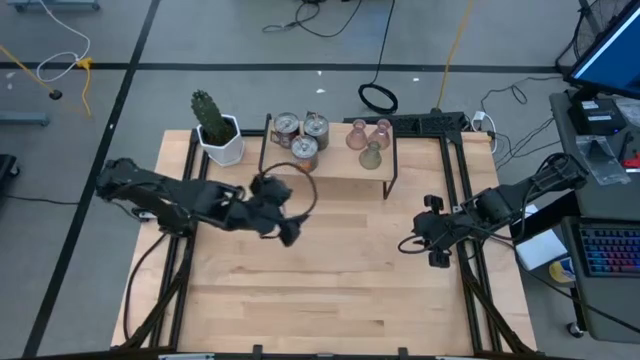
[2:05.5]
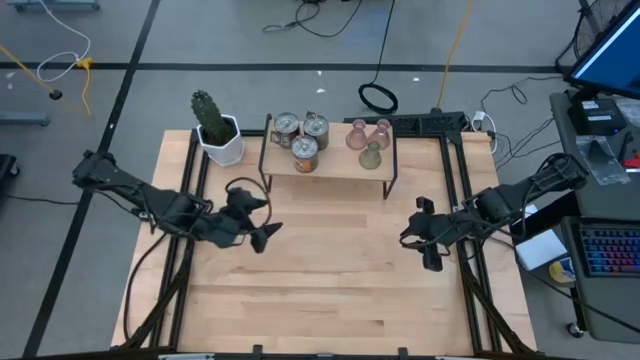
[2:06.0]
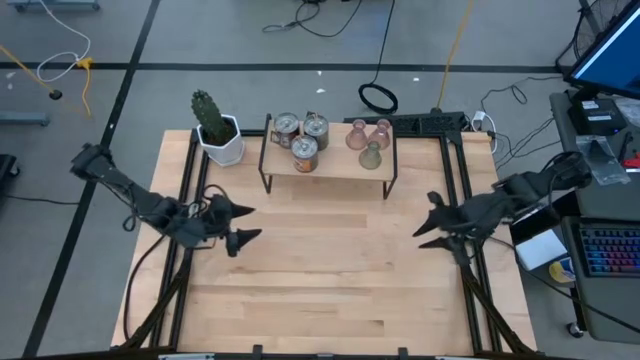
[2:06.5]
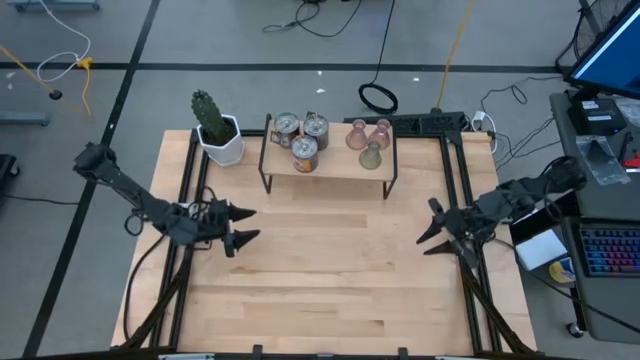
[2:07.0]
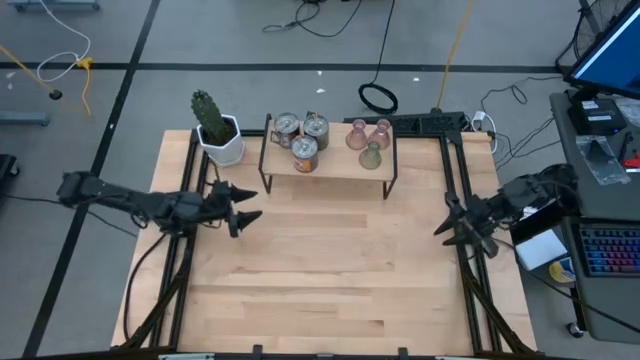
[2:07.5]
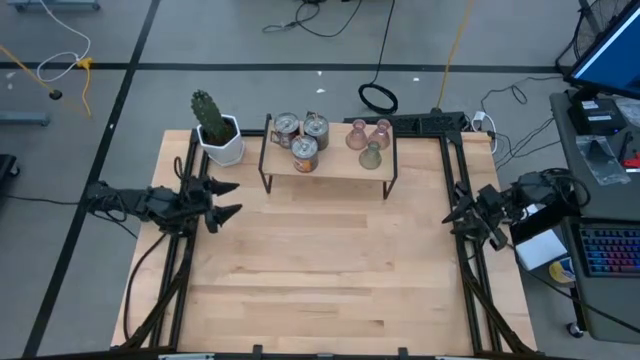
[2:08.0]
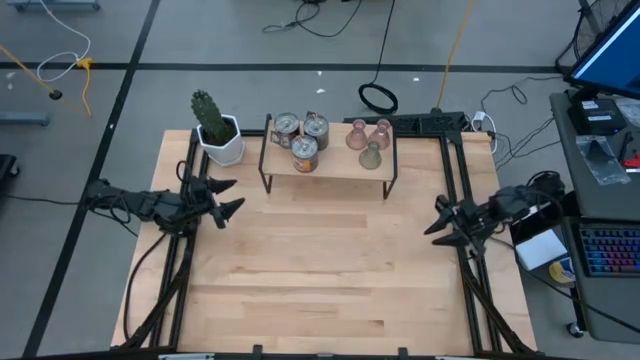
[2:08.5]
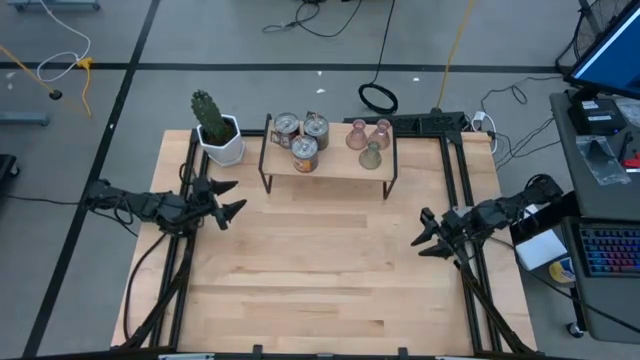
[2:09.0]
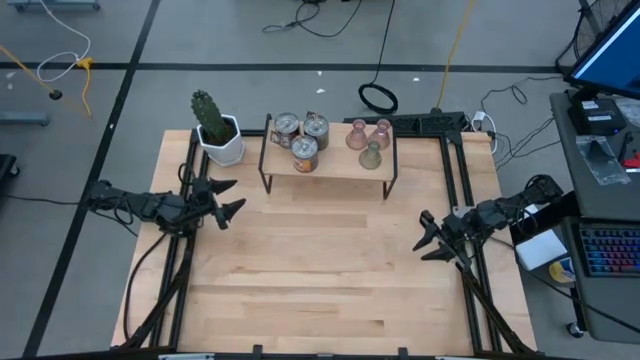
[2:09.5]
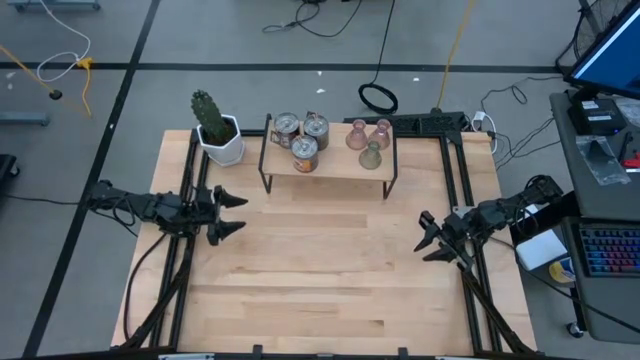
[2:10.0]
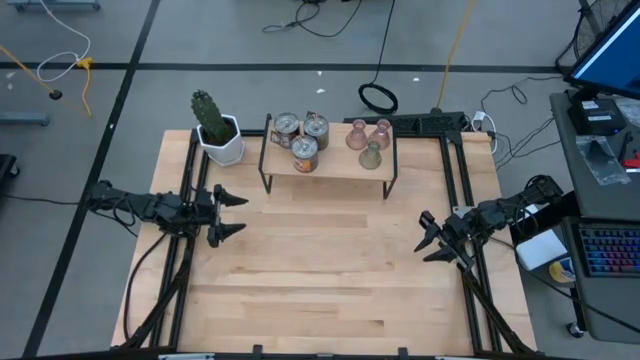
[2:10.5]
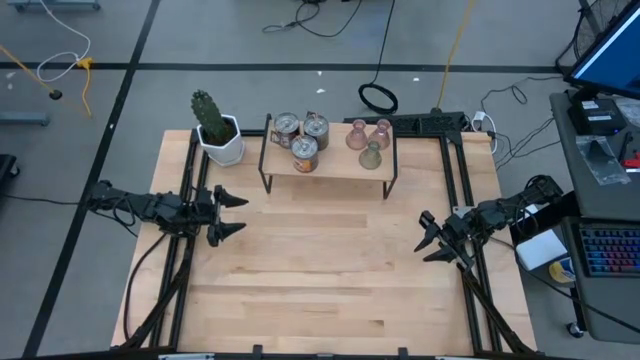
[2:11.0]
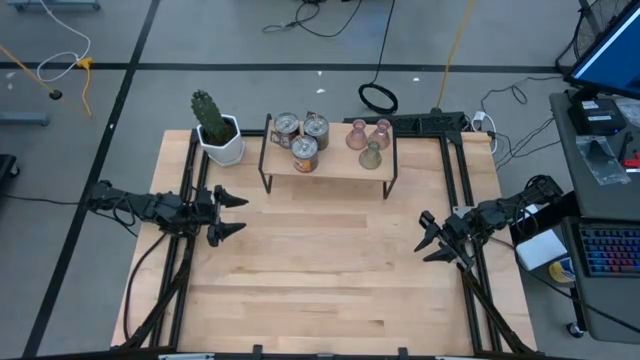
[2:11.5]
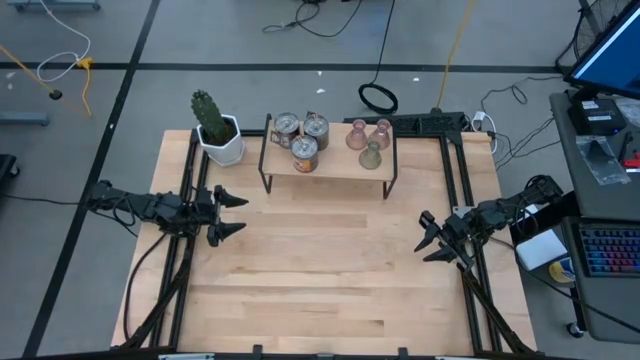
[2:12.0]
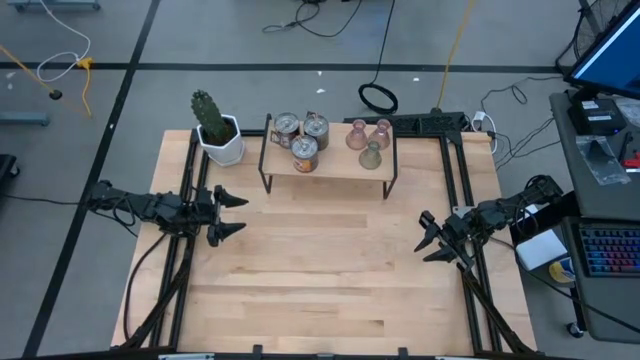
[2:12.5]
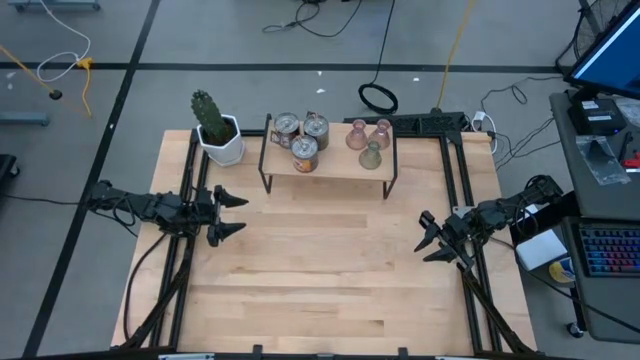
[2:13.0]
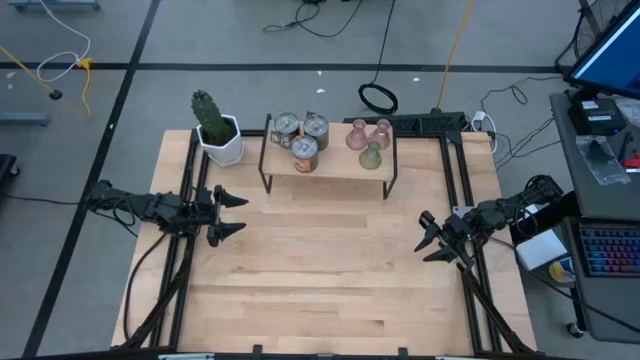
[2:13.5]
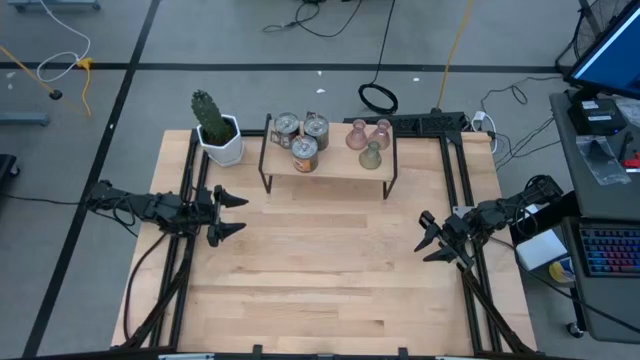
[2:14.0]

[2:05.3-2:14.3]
Task: Pick & Place candle stick holders
Return to Home Position

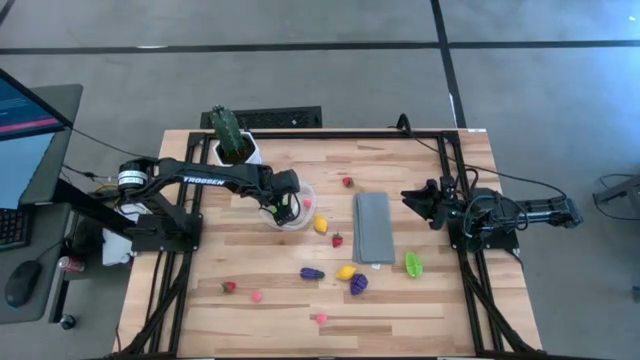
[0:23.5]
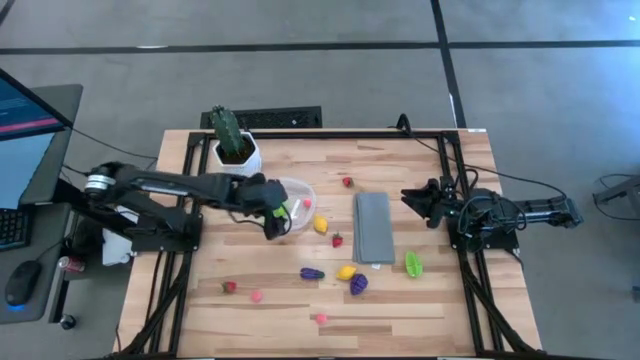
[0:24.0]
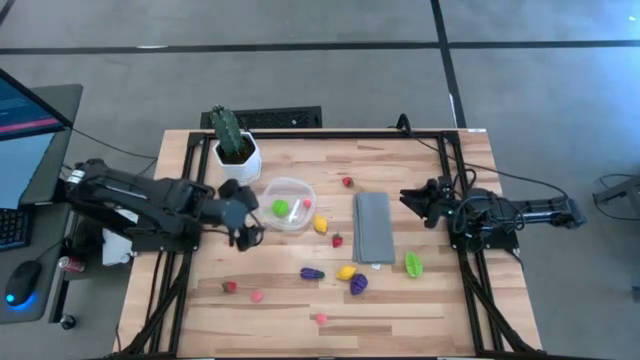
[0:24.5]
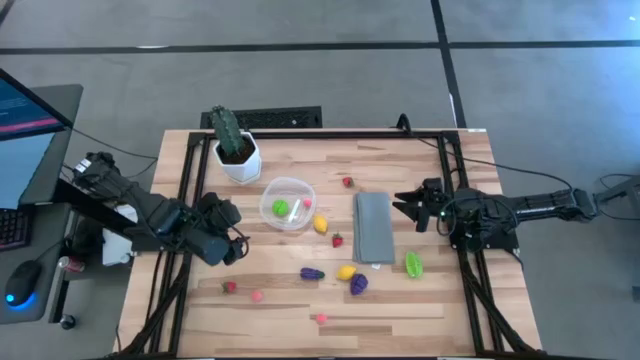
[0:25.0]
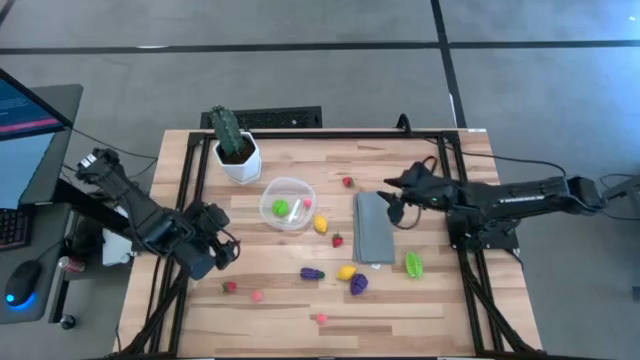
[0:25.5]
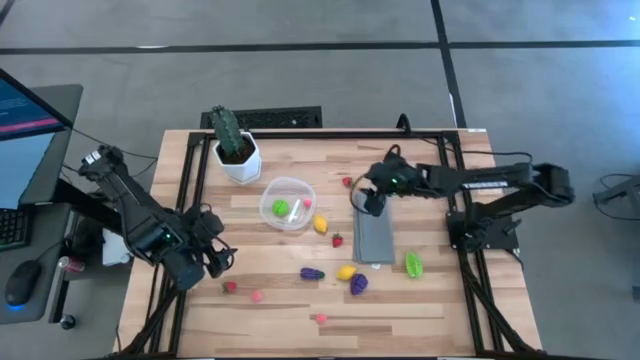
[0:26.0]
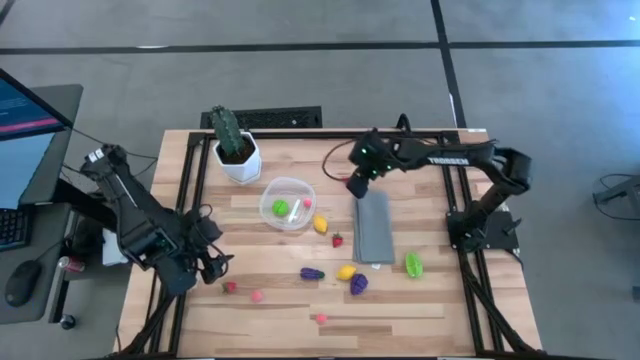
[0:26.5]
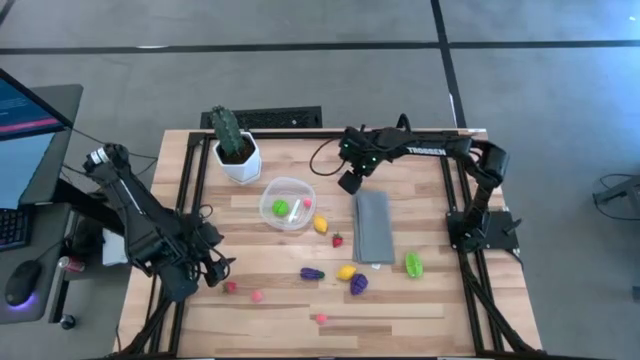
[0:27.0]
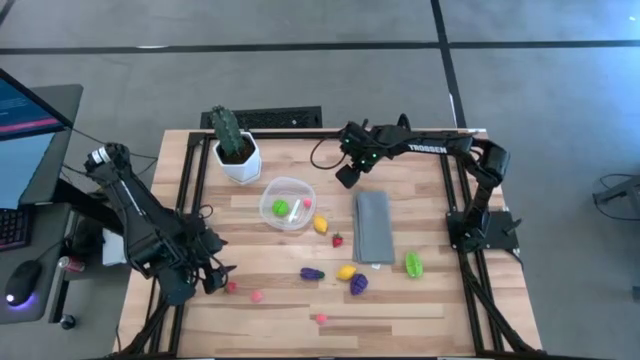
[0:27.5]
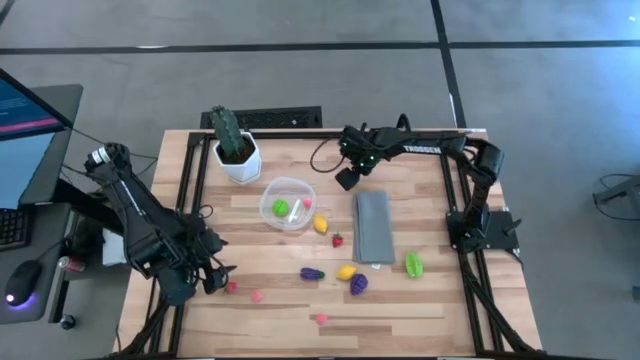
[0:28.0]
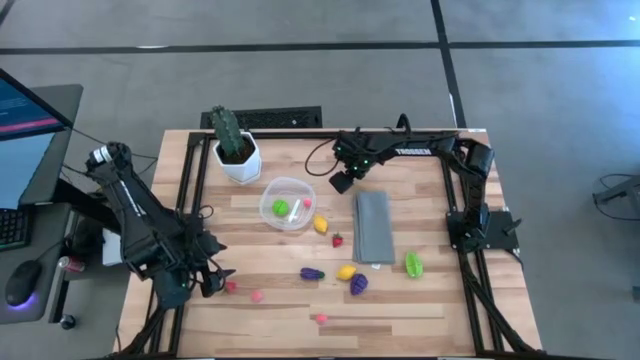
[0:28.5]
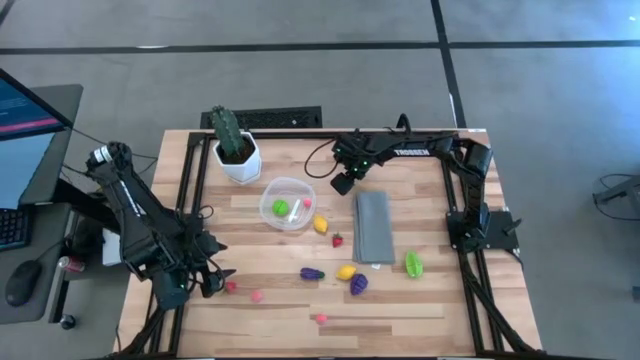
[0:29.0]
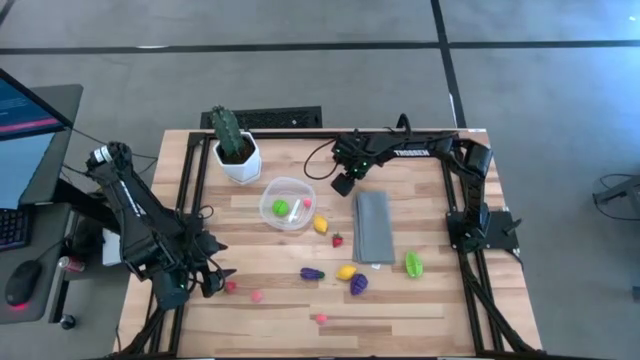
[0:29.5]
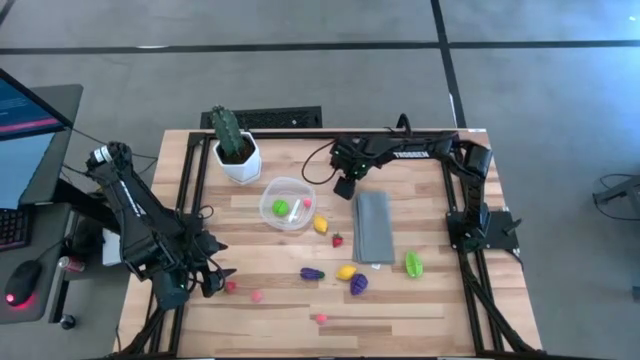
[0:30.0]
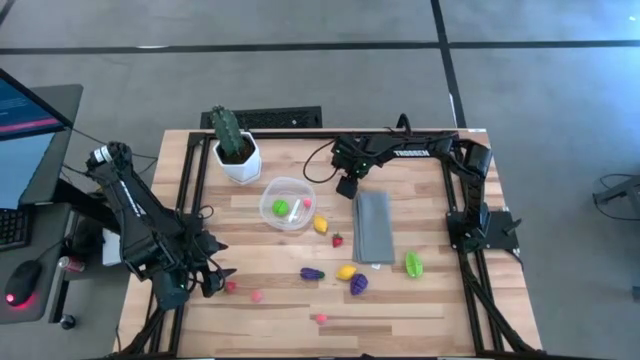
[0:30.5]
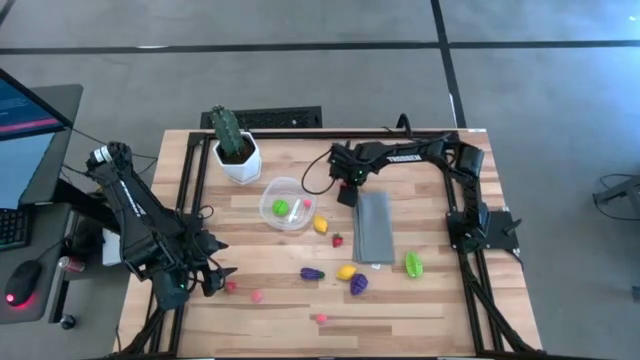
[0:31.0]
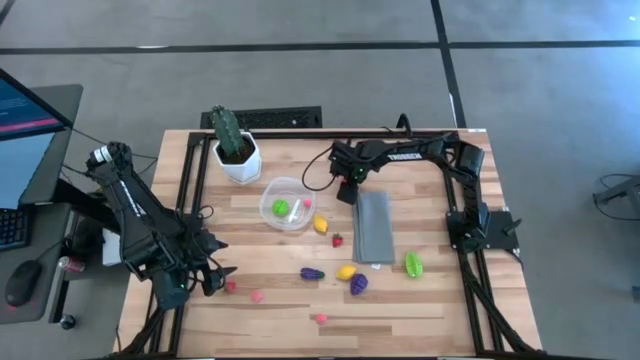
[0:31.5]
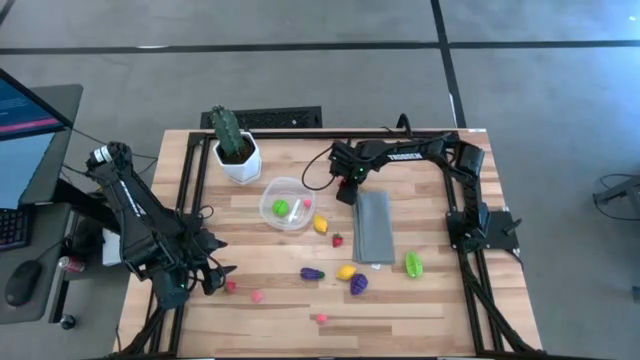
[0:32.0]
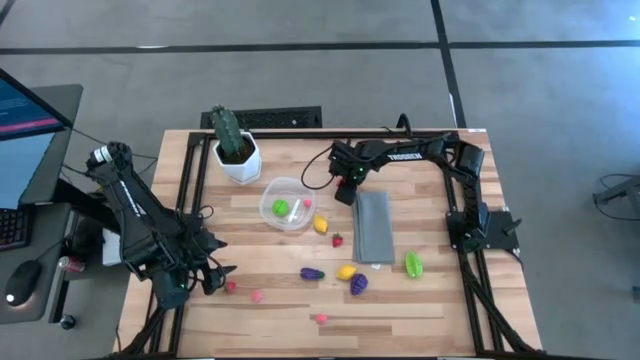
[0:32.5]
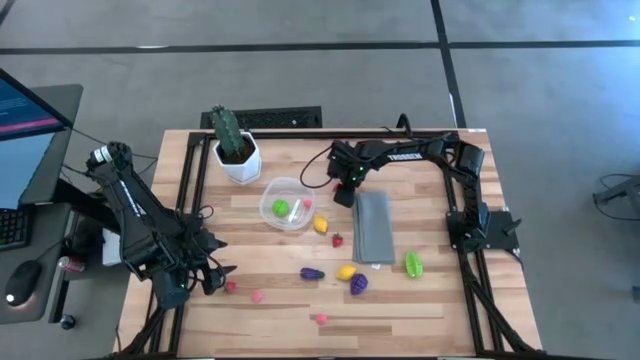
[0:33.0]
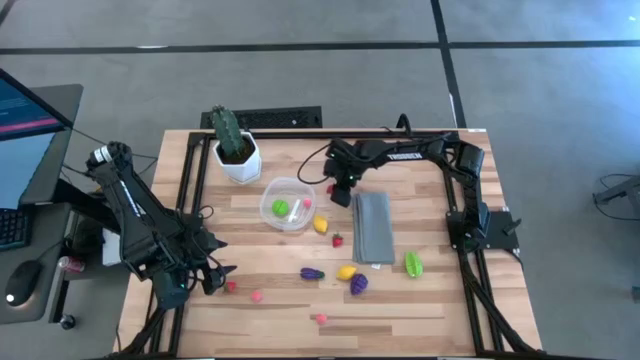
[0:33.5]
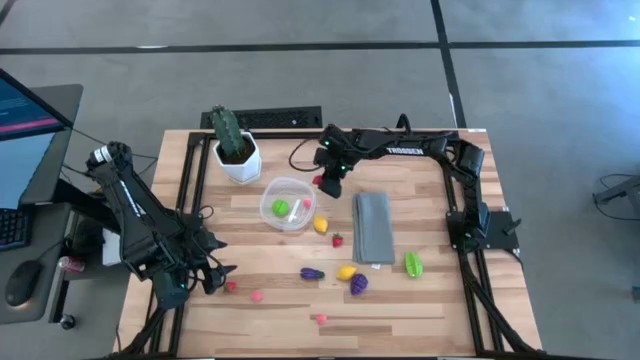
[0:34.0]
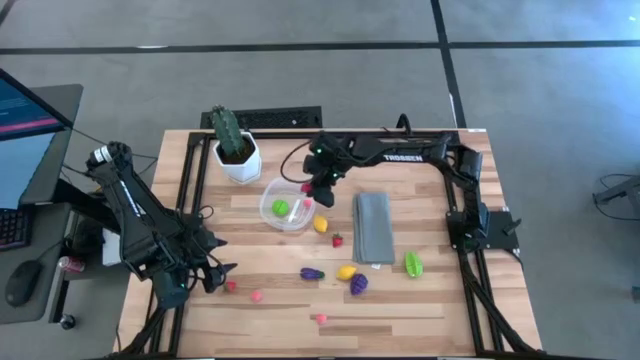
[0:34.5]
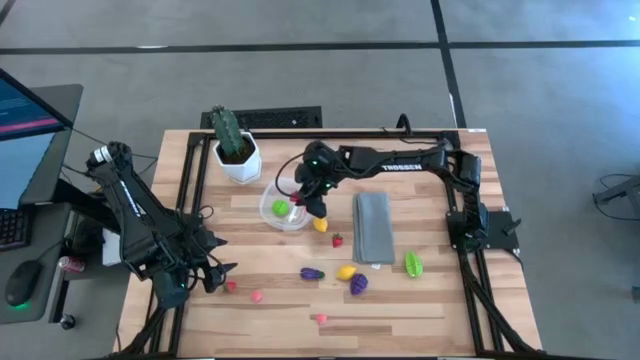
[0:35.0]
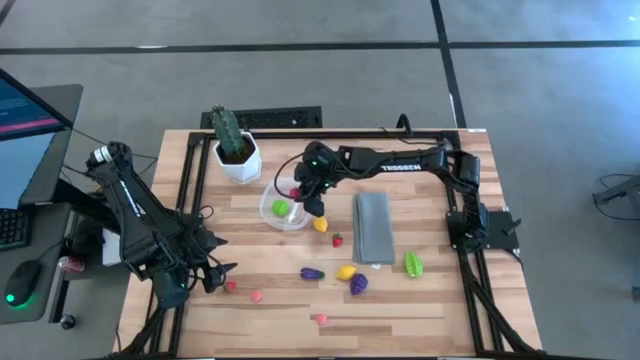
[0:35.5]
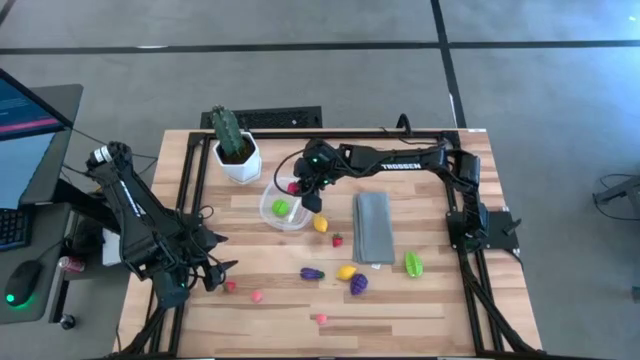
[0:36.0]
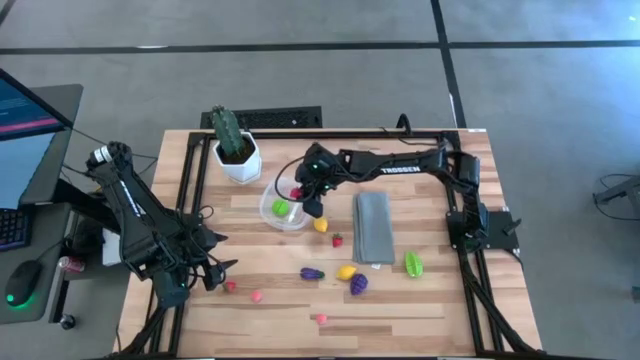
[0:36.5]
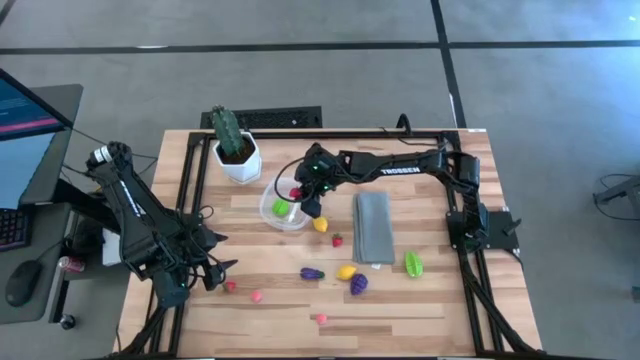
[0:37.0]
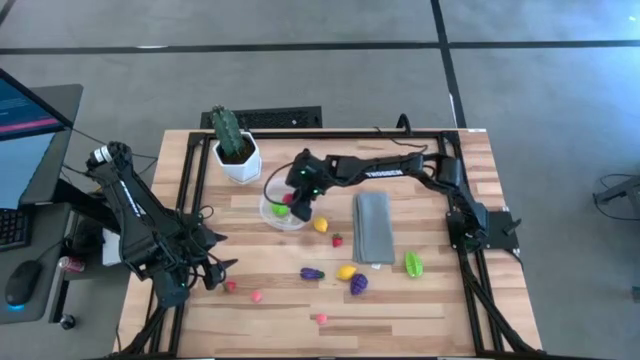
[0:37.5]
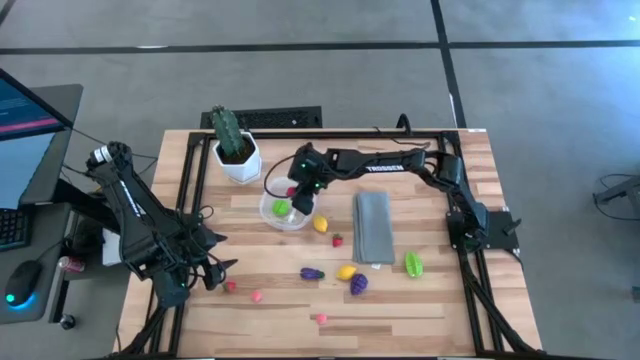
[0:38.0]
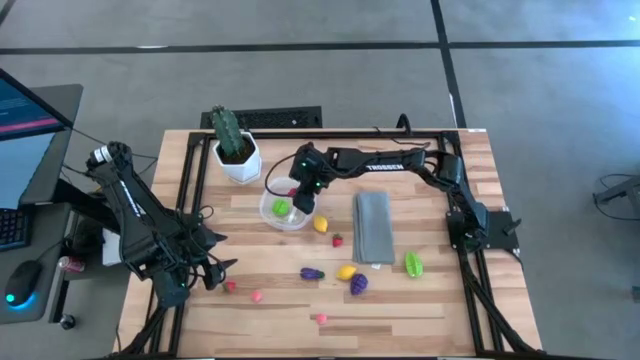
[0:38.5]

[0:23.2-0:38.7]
Task: Pick and placing Produce into tupperware
Put the top red strawberry into the transparent container
